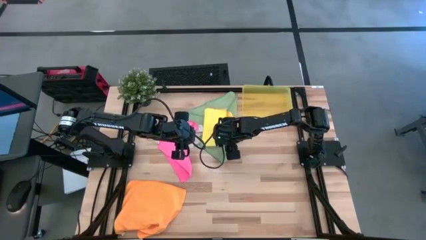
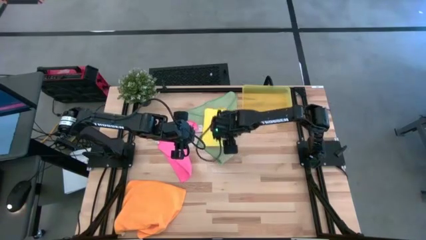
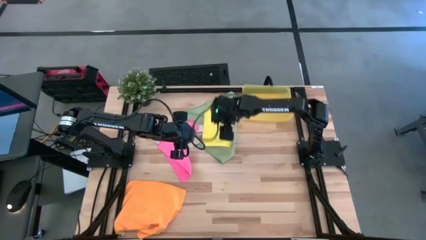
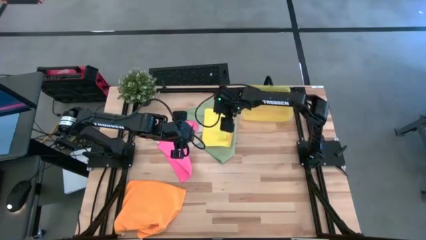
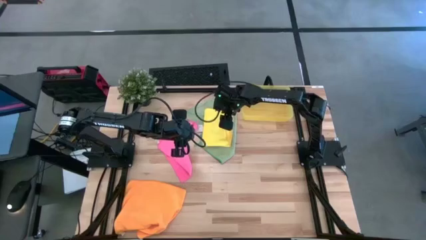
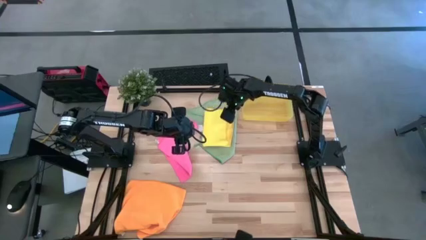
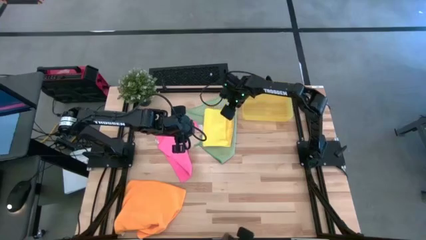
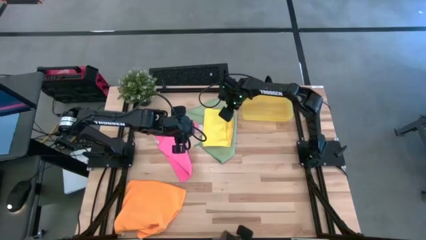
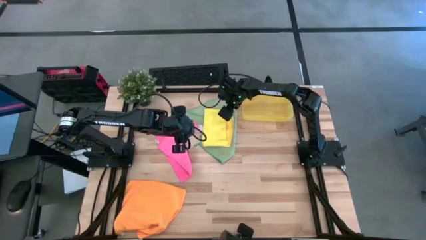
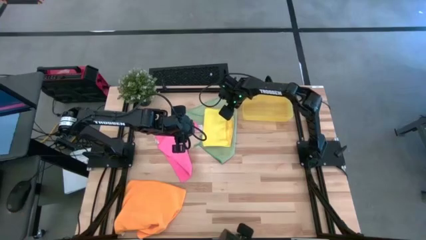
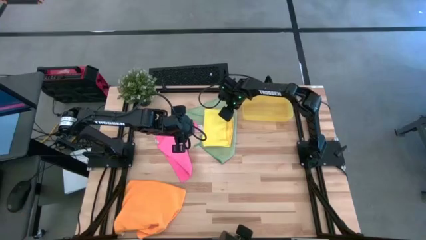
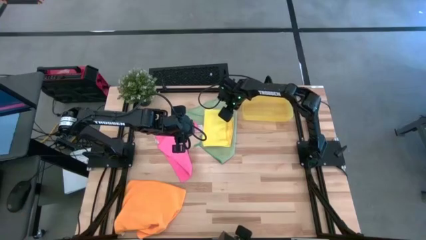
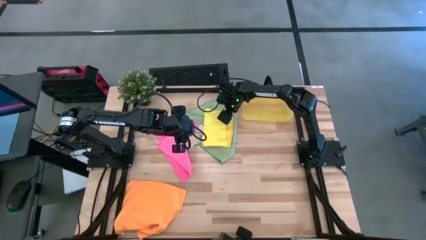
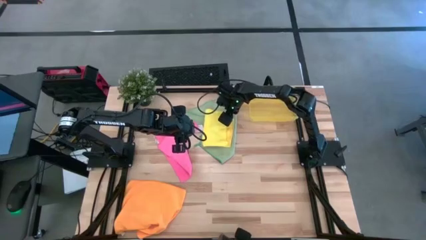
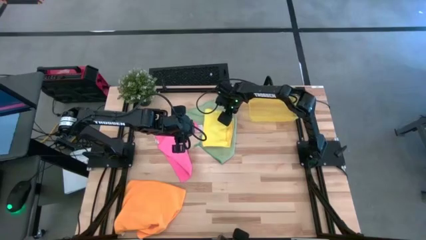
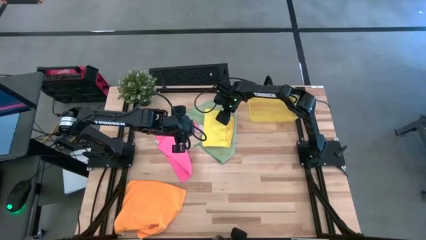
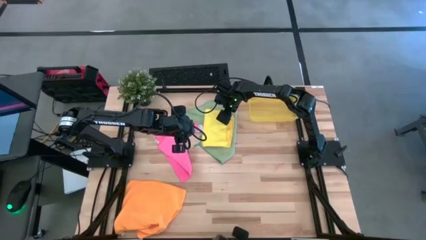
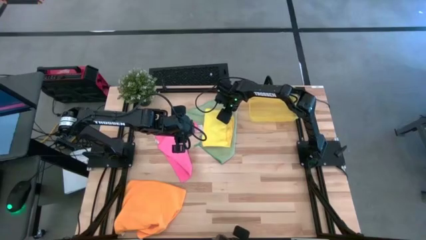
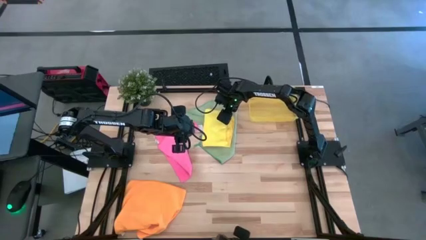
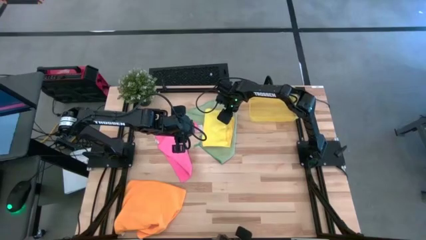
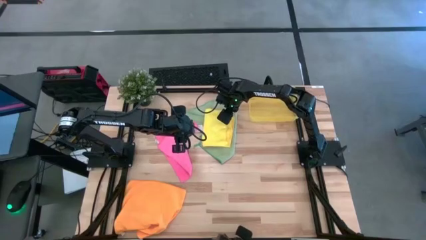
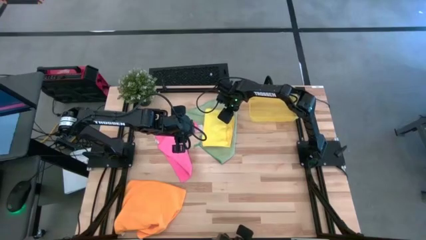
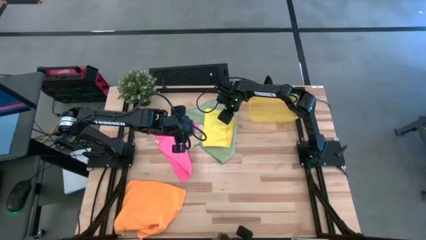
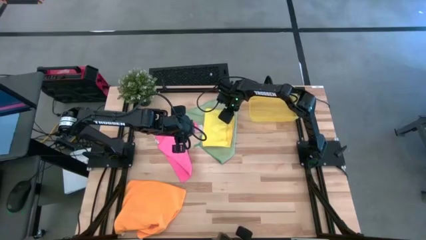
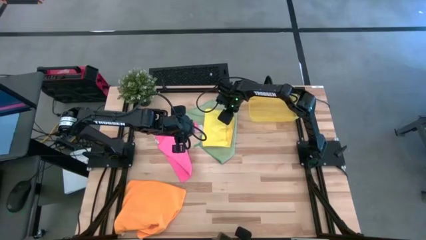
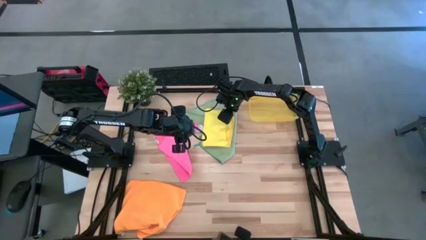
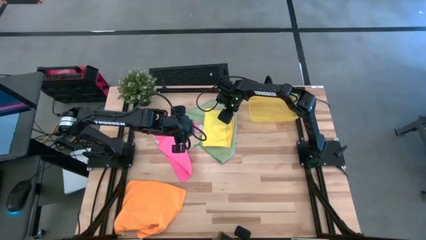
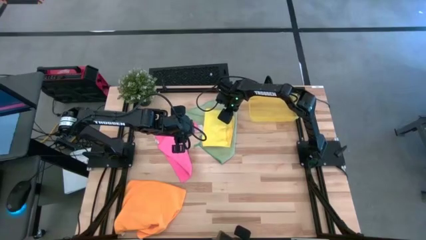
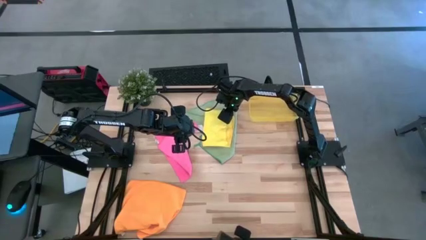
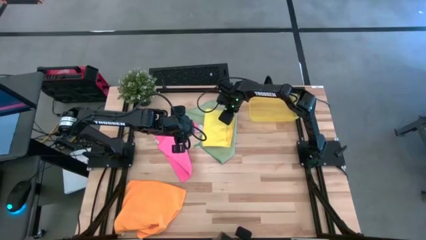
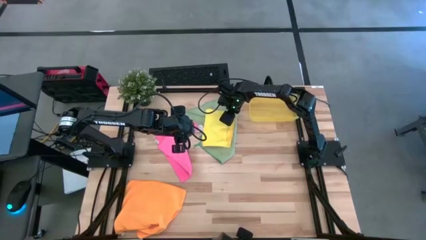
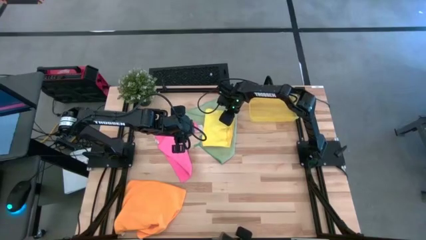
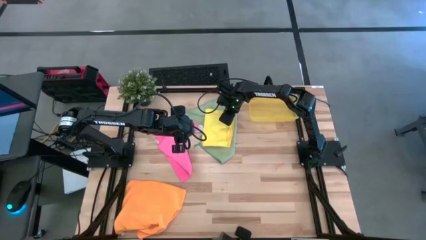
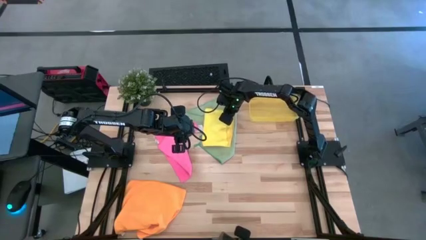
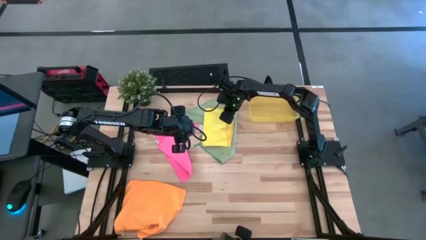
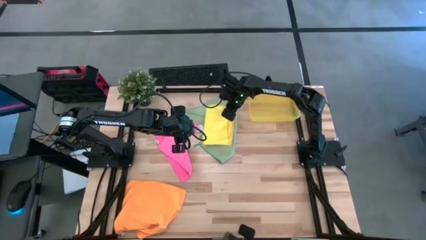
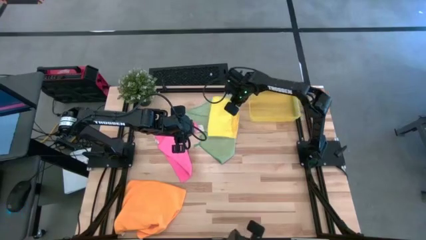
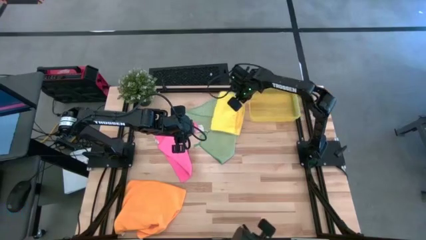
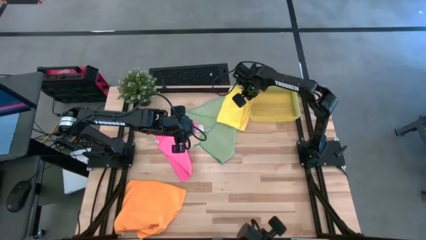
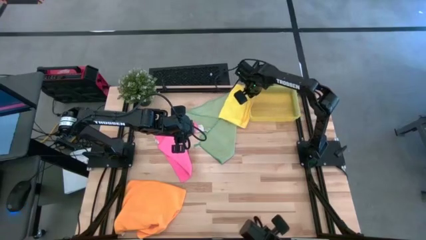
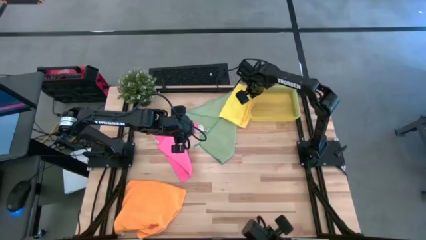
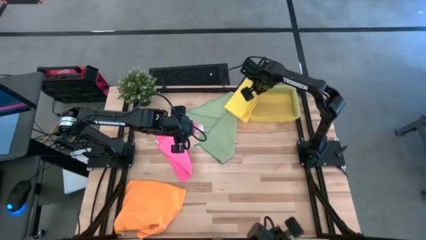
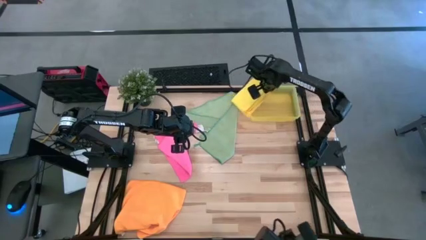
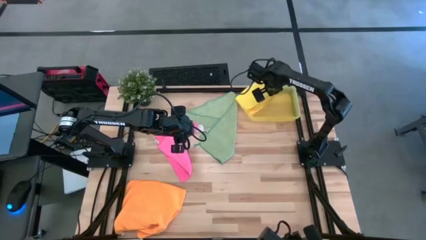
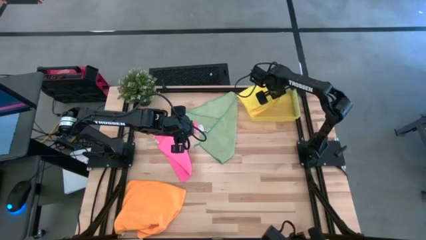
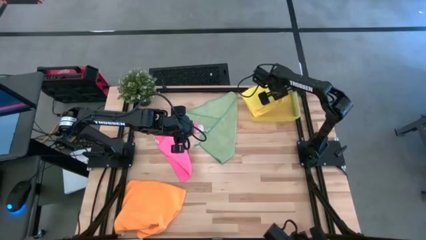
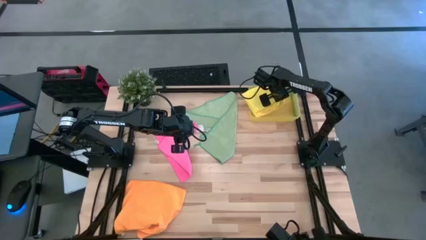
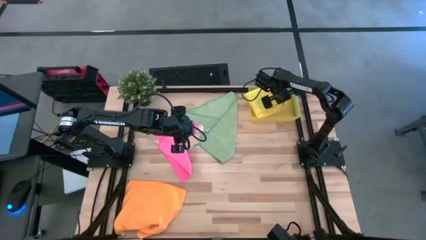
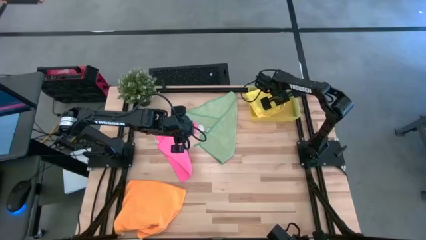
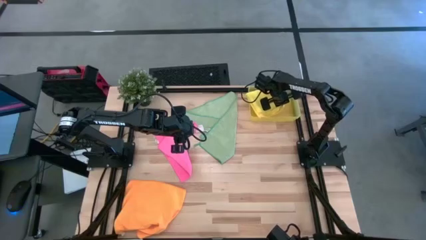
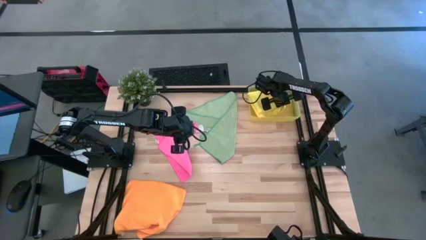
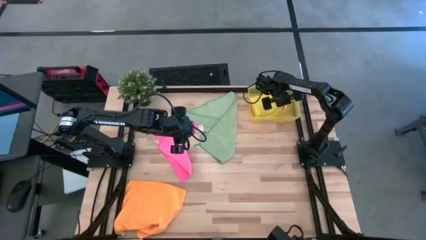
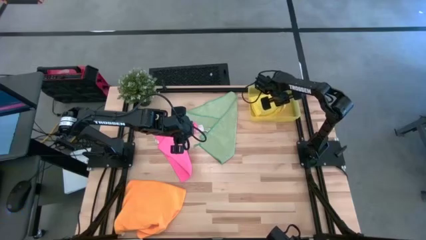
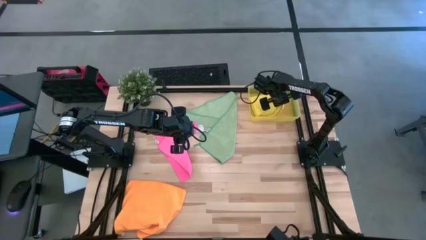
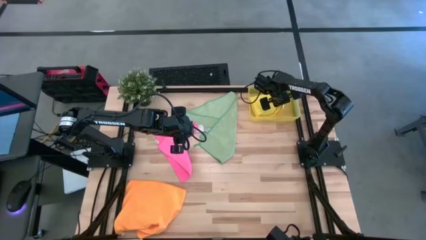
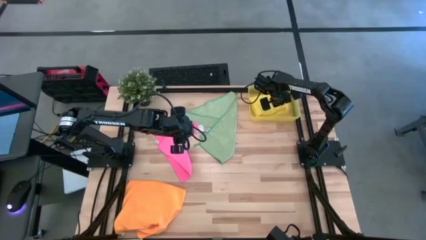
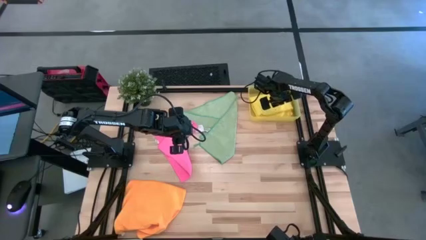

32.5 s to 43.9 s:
Task: Fold microfiber towels
Put the yellow towel into the bin

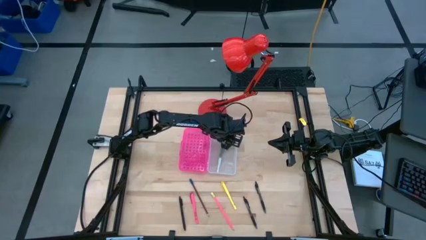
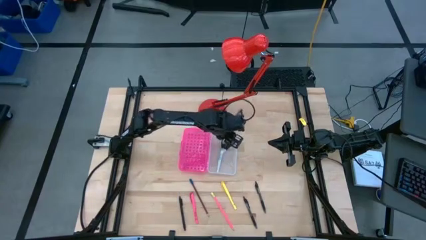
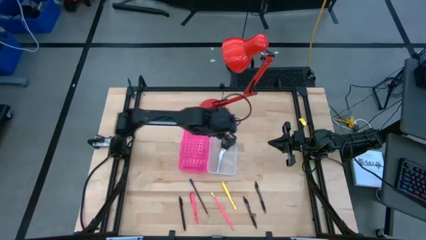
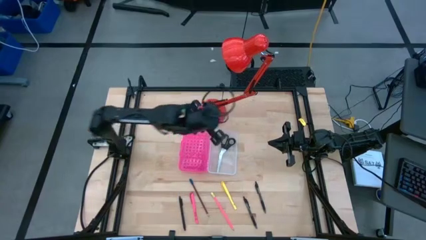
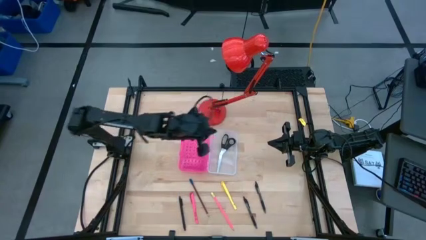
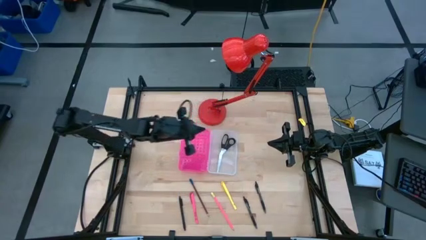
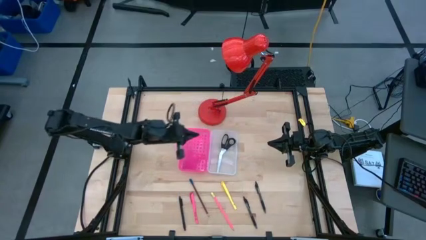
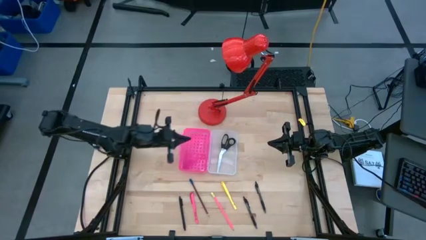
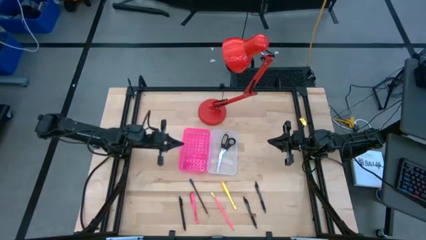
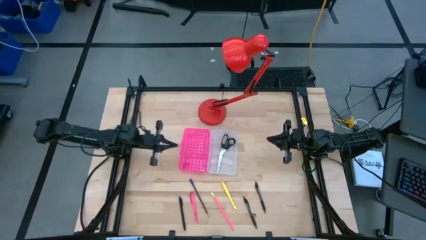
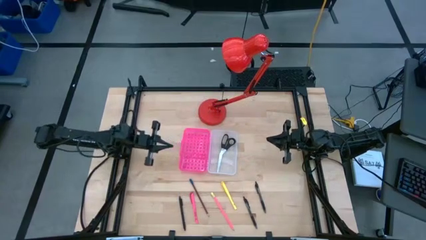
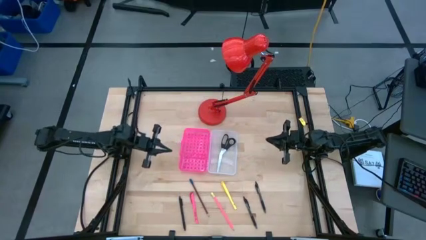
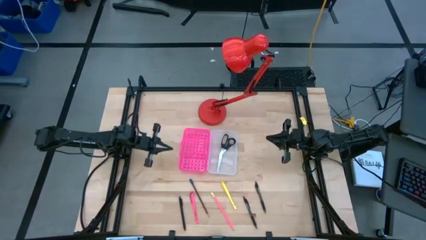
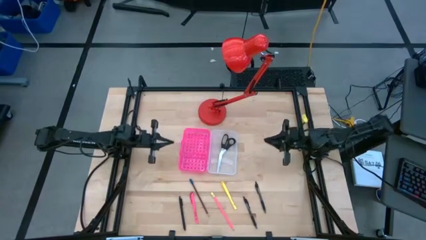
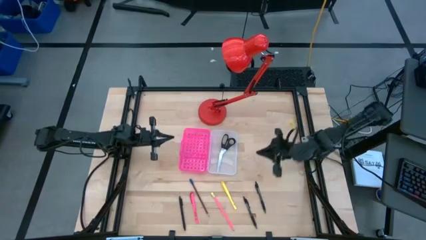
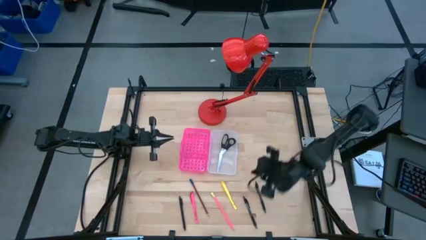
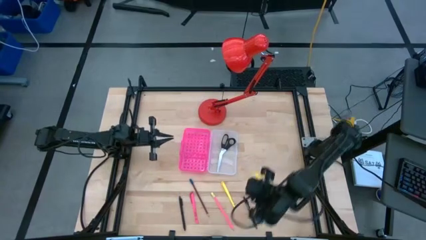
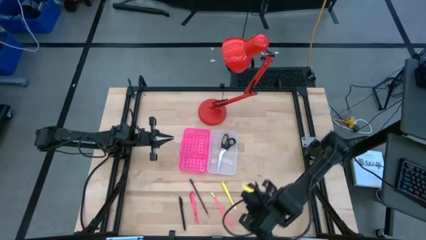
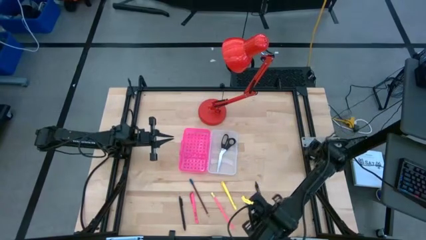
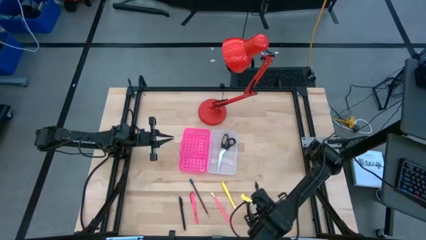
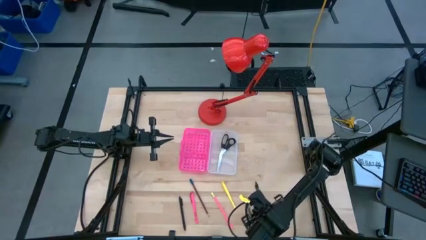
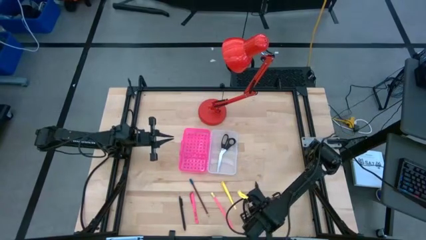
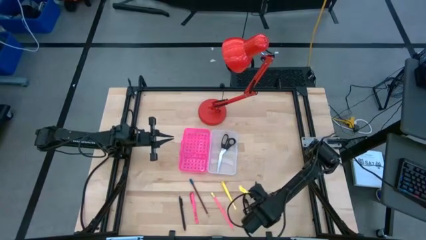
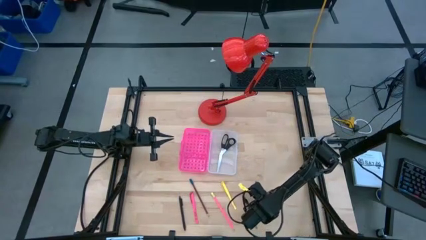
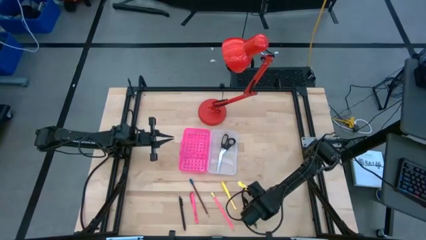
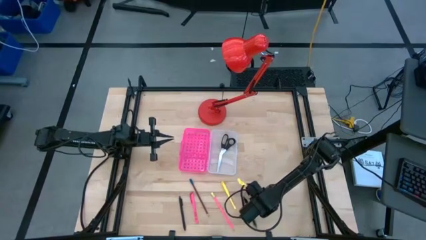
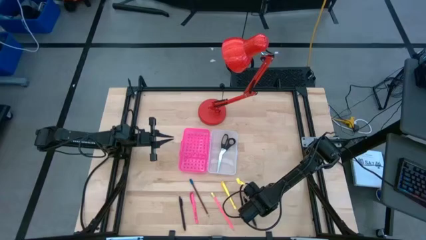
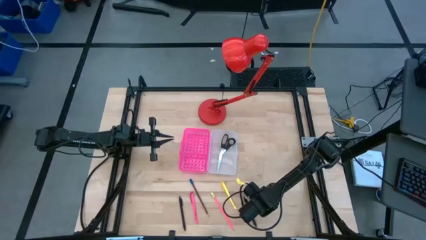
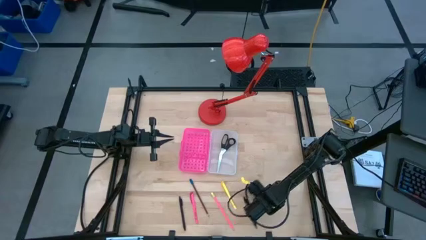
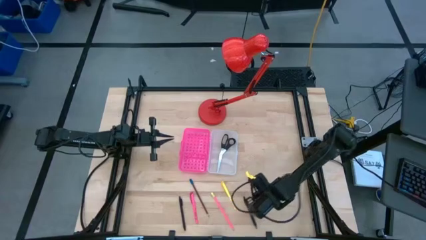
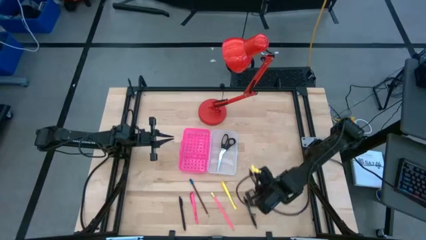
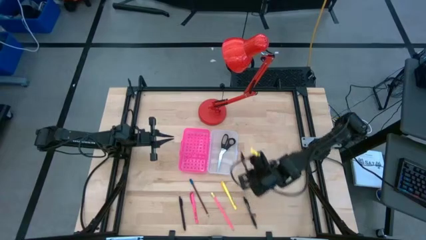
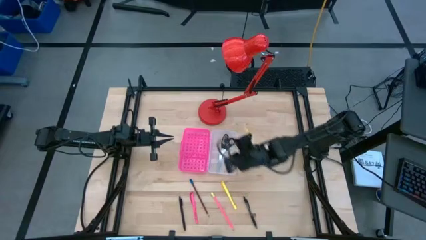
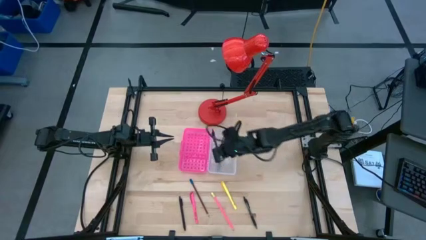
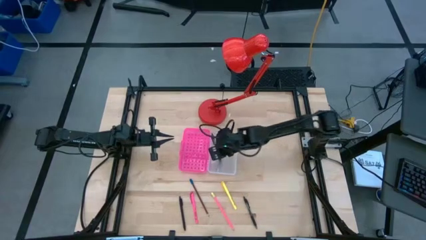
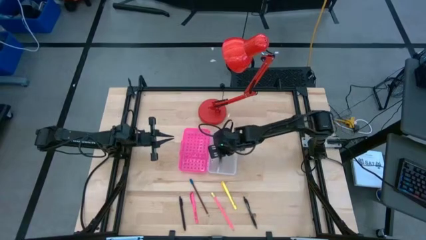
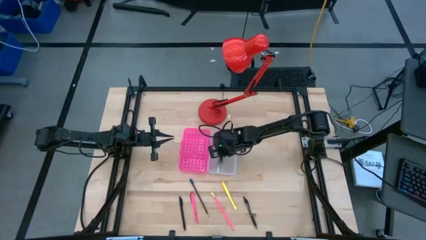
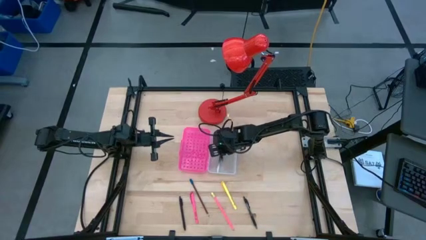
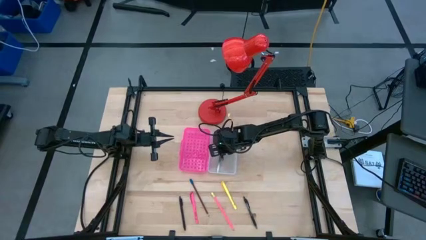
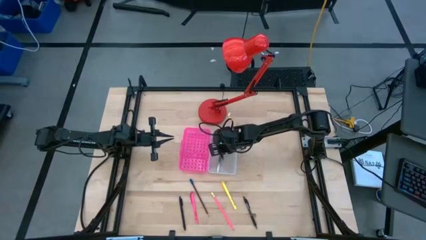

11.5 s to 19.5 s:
Task: Pick & place school supplies into a supply box
Put the right black pen into the supply box
